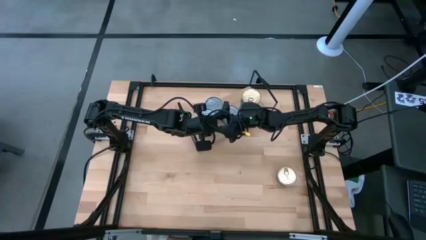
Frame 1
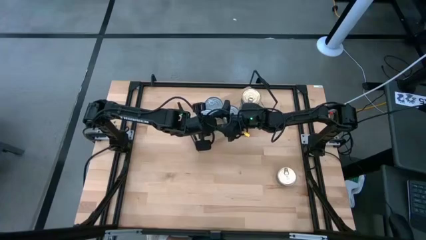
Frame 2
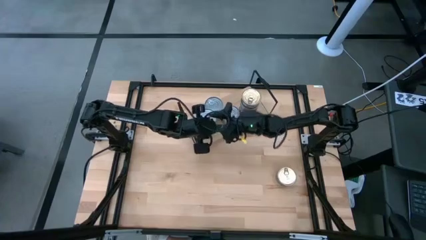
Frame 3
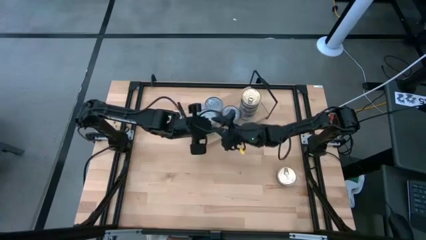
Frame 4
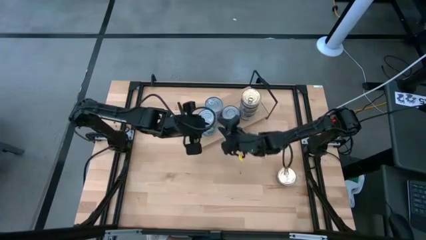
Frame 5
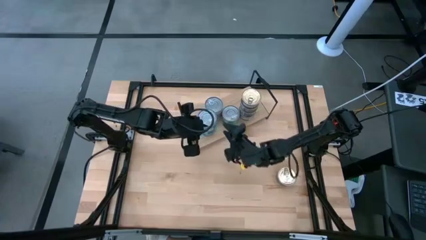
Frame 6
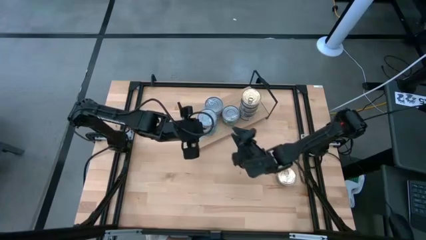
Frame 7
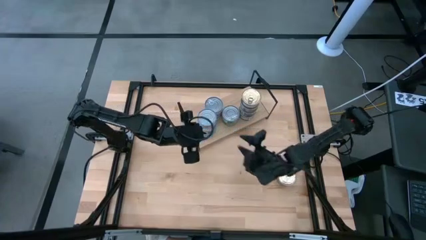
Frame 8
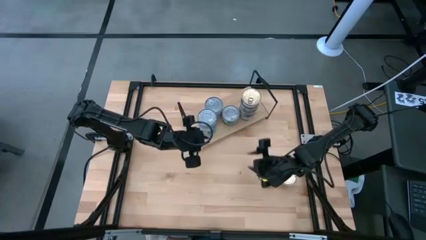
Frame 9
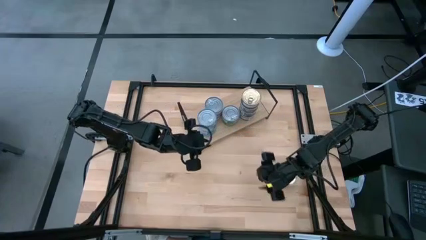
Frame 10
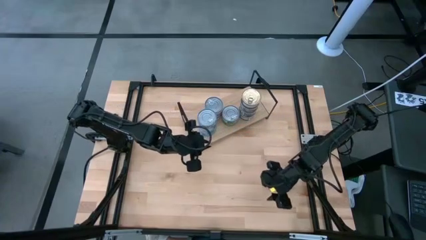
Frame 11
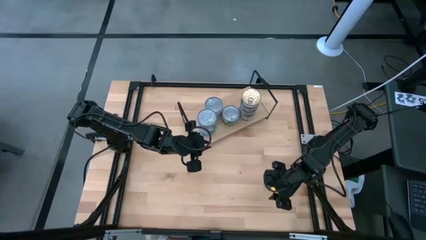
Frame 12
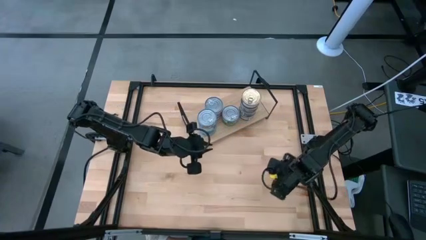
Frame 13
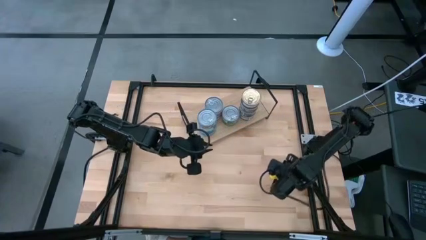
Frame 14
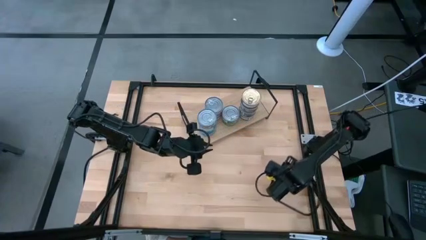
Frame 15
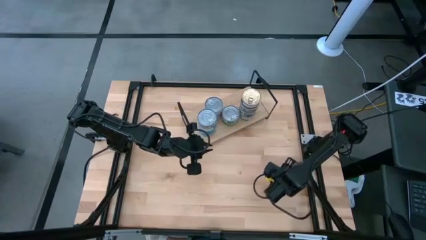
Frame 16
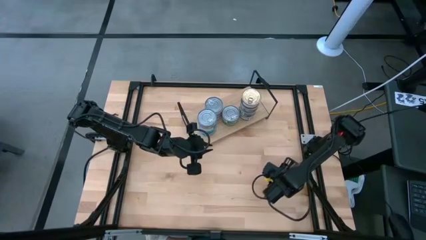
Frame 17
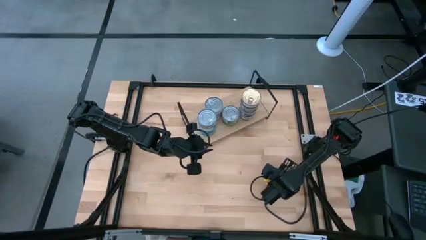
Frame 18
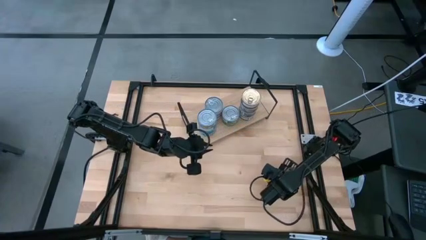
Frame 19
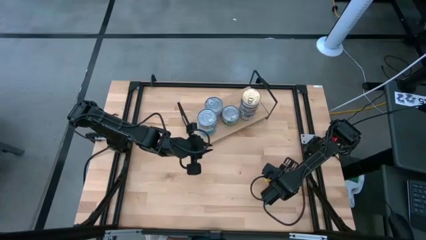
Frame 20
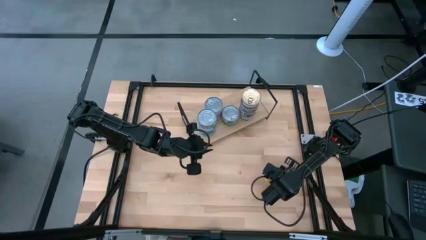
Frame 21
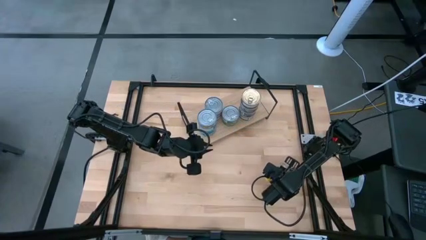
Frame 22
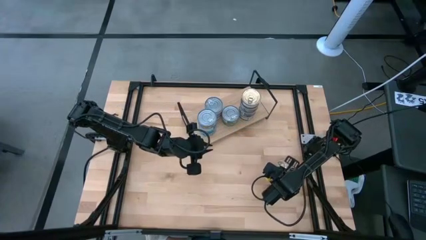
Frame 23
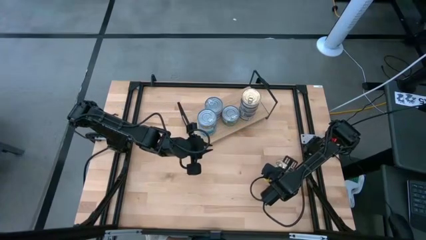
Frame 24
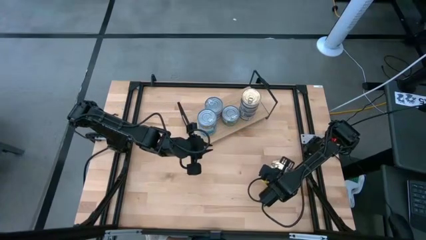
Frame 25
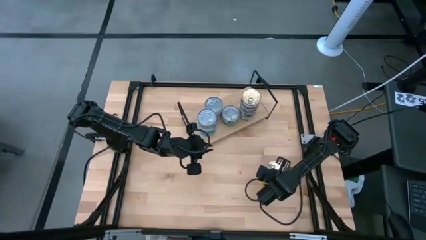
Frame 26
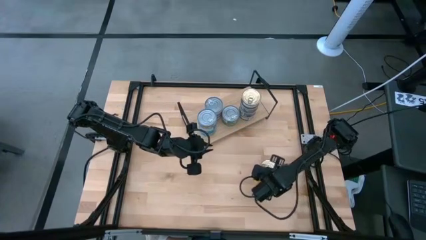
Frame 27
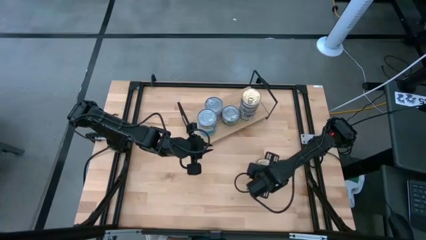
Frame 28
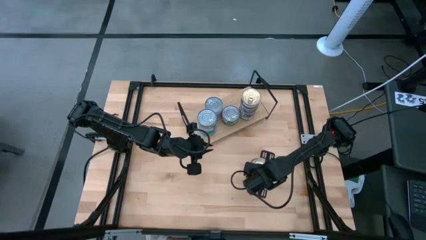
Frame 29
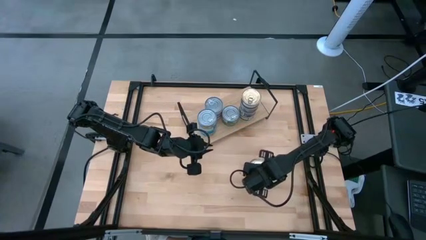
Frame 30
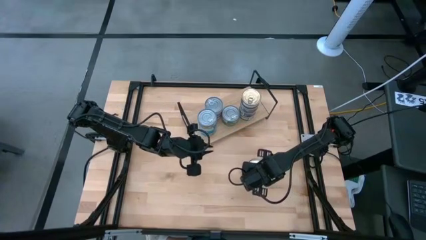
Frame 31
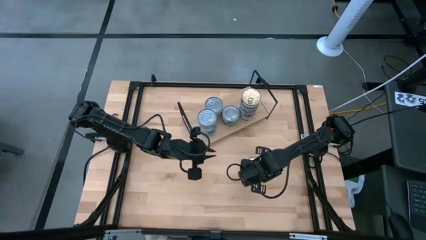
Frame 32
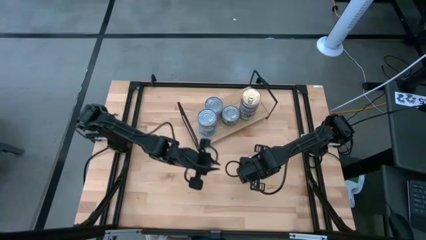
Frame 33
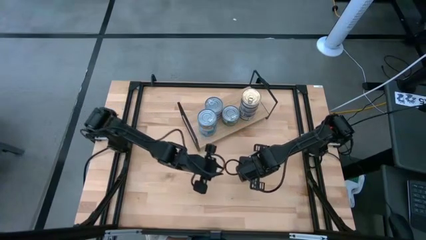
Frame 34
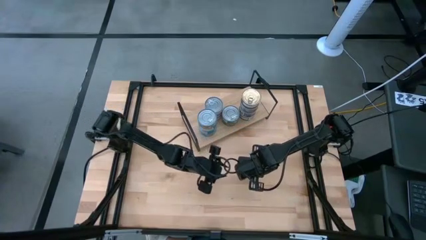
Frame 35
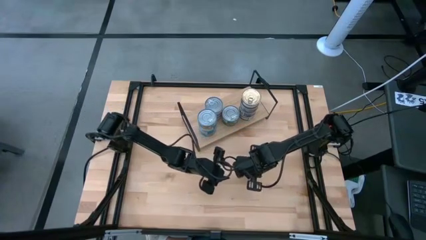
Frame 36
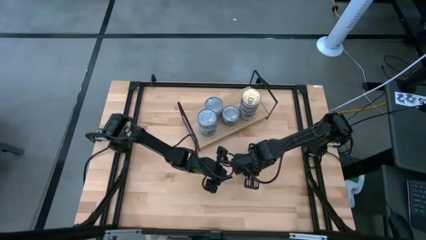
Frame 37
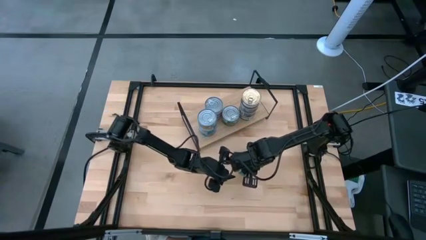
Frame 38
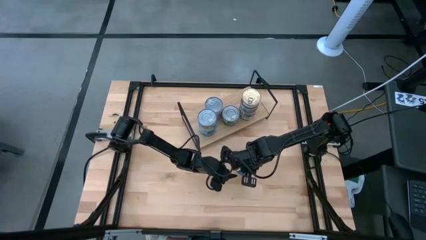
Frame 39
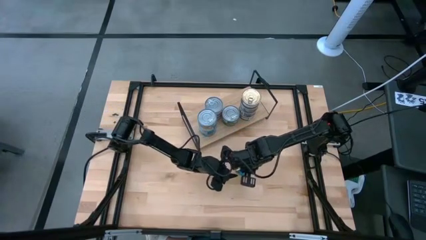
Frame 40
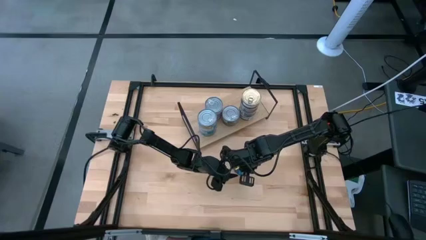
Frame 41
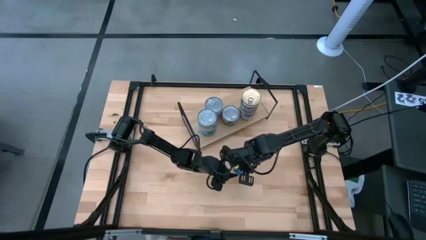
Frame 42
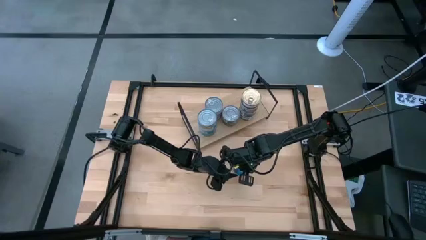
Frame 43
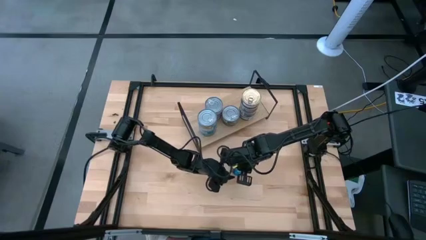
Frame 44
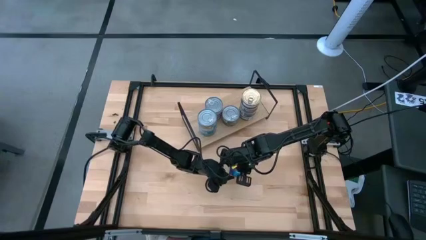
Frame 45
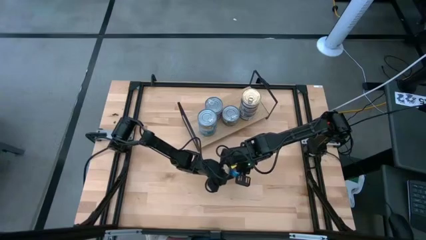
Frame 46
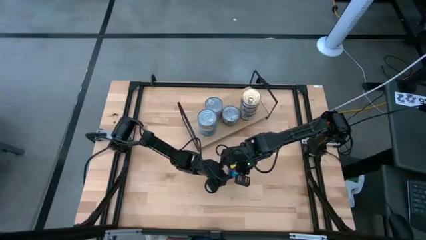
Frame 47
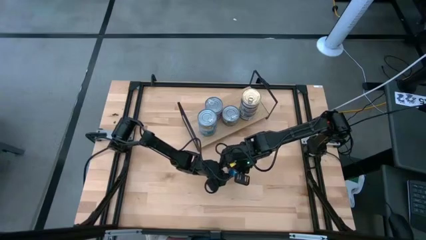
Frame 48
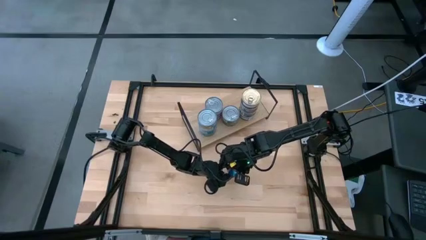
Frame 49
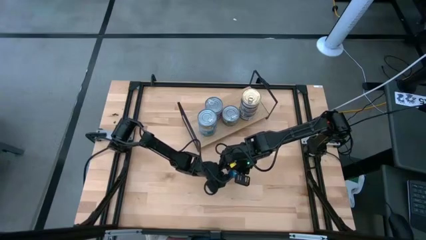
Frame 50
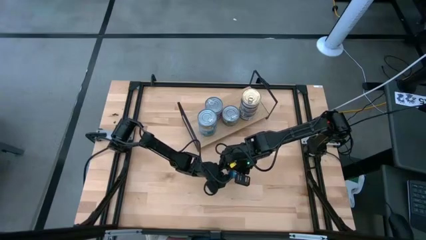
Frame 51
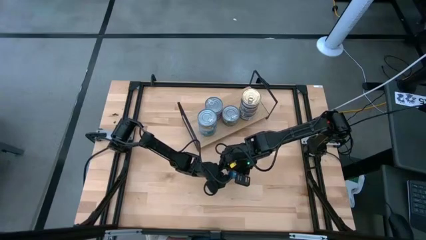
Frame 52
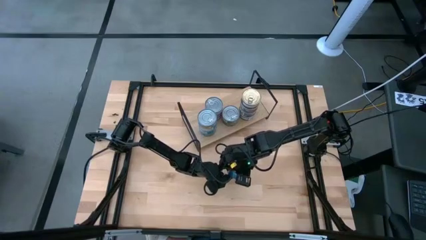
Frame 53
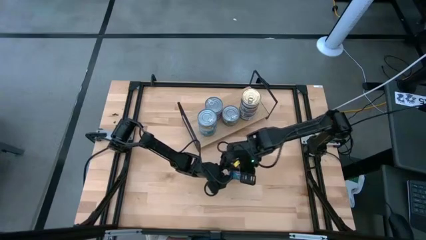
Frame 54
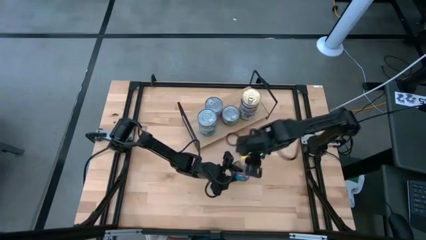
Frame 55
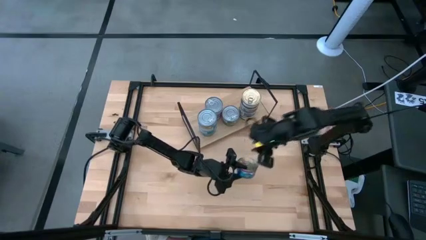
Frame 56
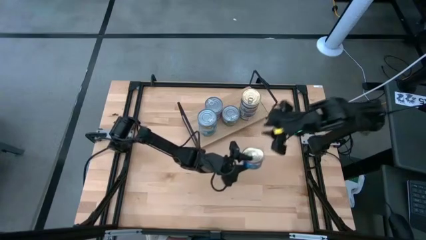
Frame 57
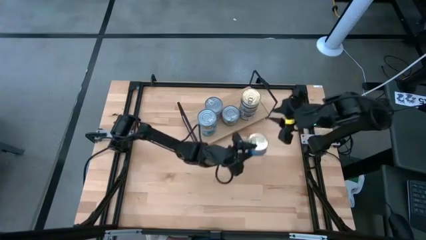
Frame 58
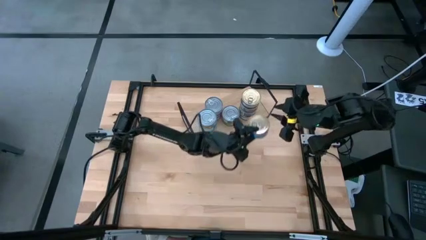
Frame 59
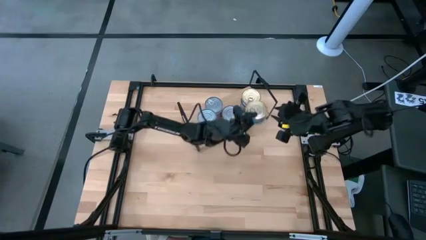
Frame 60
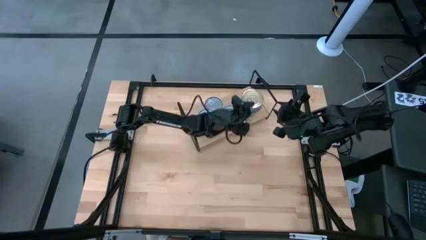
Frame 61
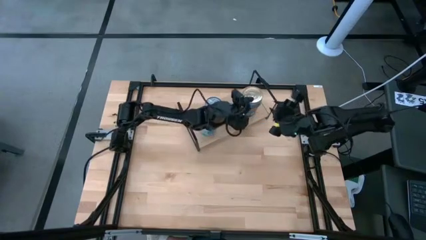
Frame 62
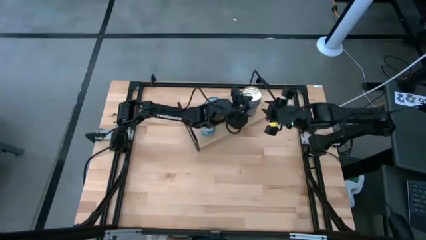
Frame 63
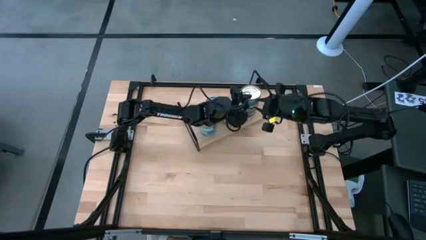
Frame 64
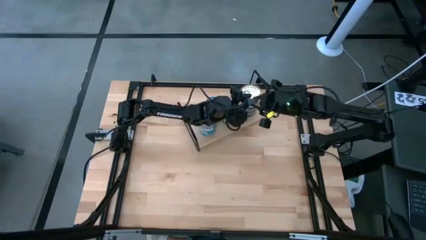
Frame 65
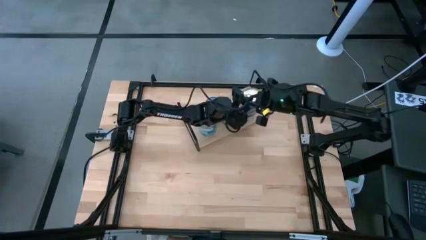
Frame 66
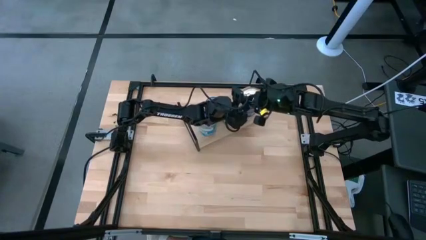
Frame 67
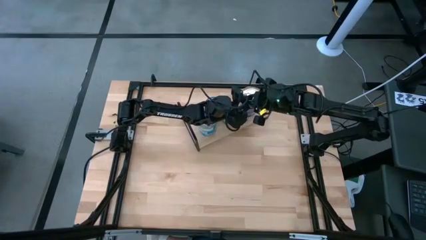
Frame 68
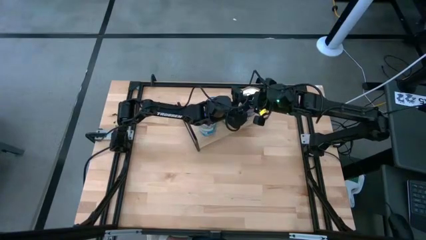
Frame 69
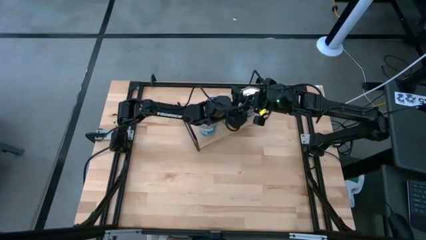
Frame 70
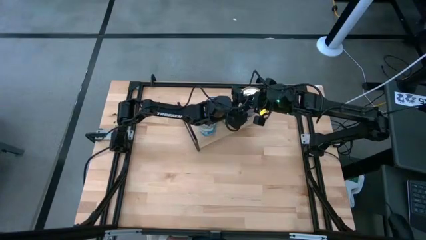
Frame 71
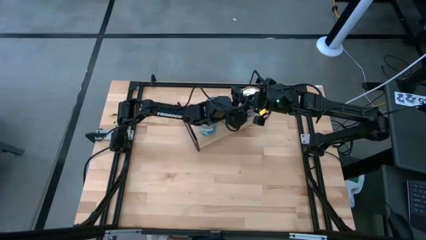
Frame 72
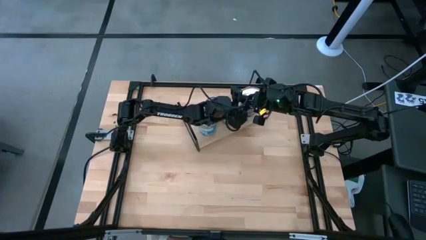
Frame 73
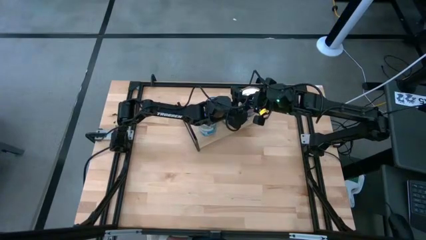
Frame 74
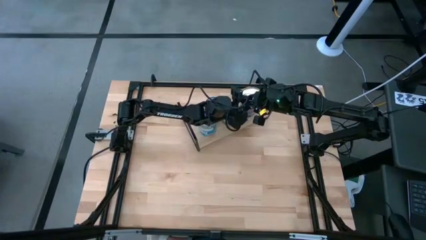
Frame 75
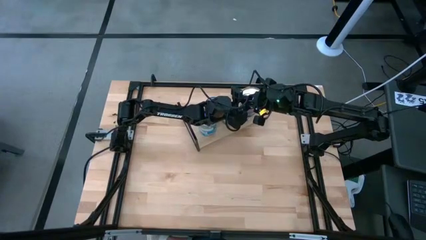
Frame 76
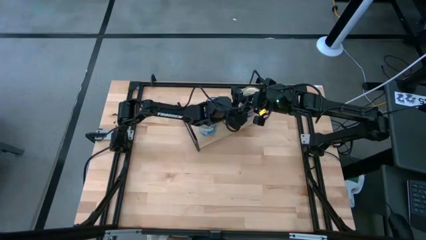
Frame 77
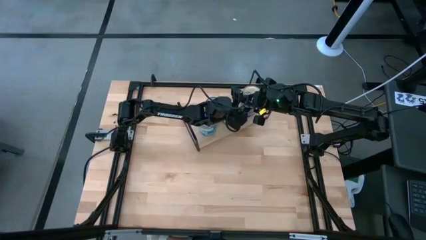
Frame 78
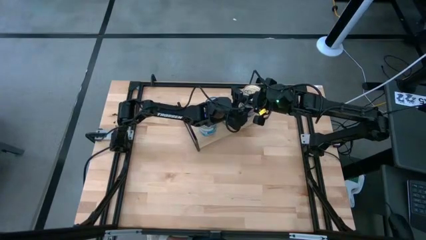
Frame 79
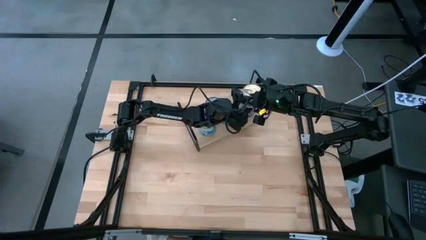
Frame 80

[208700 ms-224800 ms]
Task: Stack canned seafood by type on shelf
Stack the blue and pink tuna can on the shelf on top of the other blue and pink tuna can
